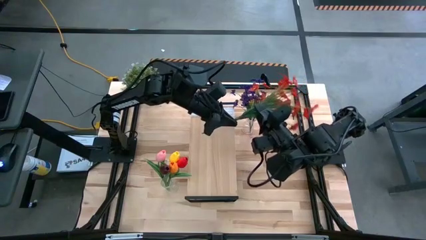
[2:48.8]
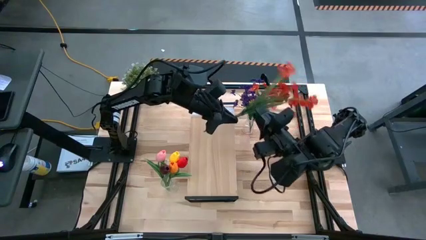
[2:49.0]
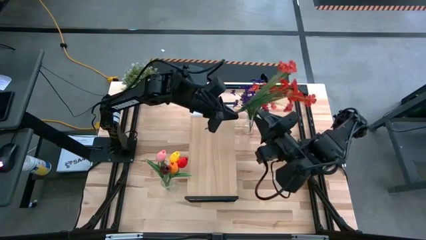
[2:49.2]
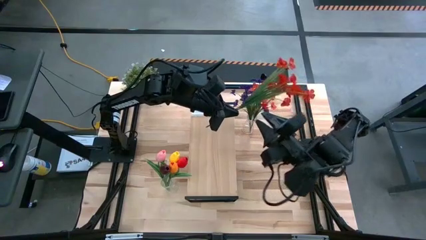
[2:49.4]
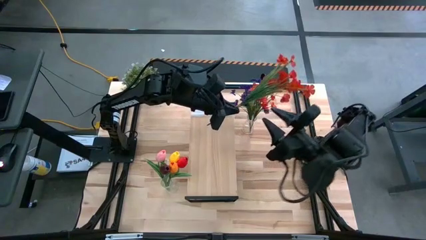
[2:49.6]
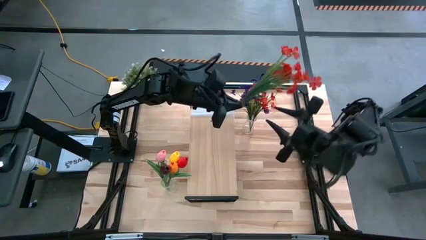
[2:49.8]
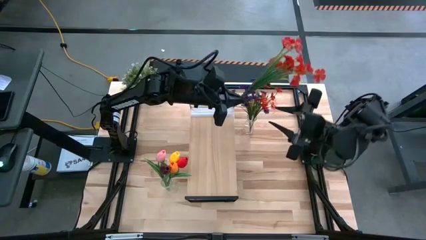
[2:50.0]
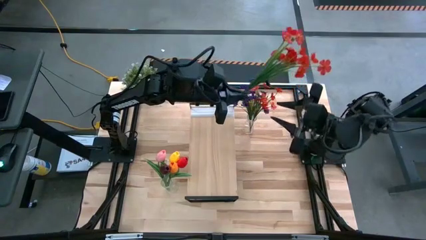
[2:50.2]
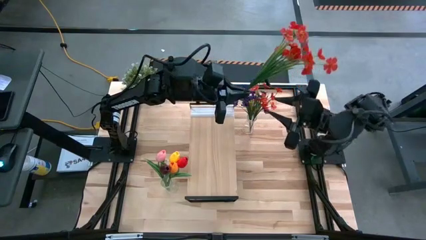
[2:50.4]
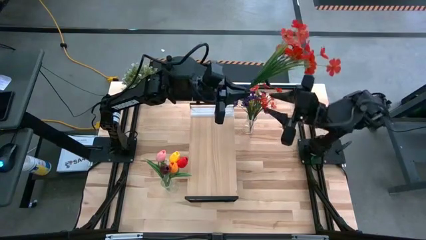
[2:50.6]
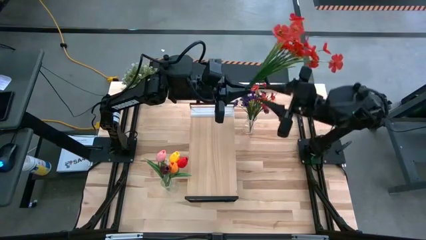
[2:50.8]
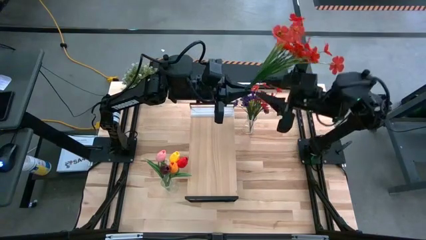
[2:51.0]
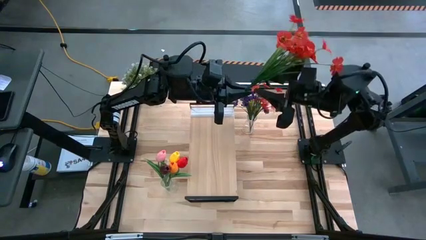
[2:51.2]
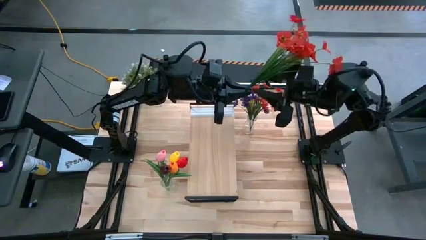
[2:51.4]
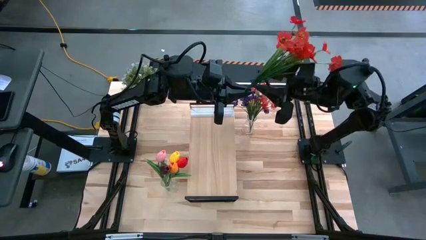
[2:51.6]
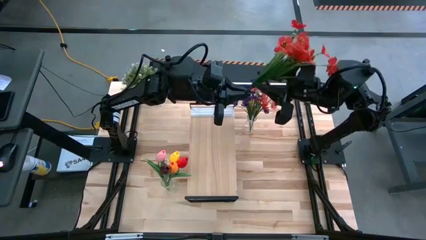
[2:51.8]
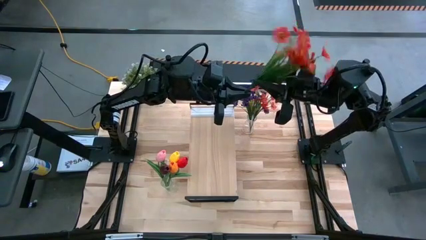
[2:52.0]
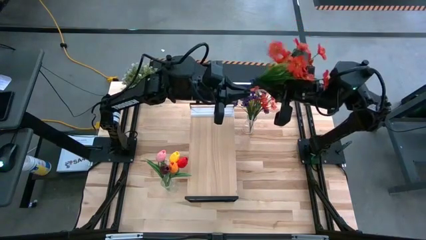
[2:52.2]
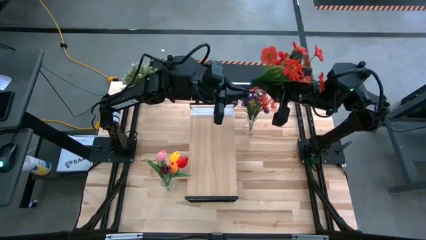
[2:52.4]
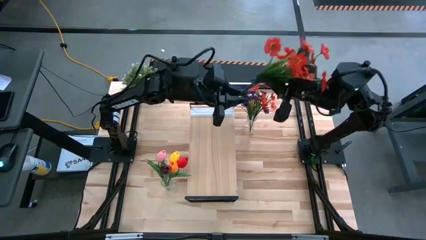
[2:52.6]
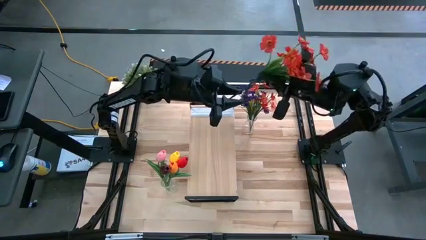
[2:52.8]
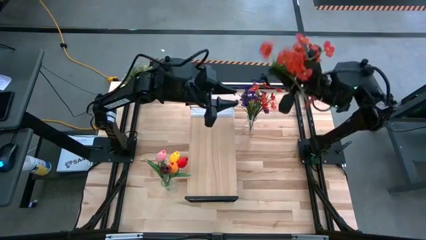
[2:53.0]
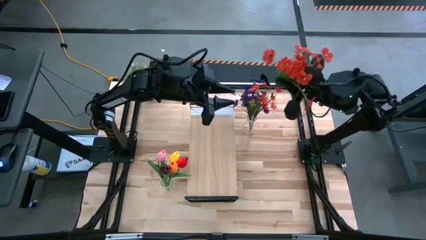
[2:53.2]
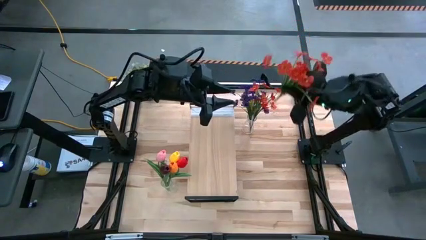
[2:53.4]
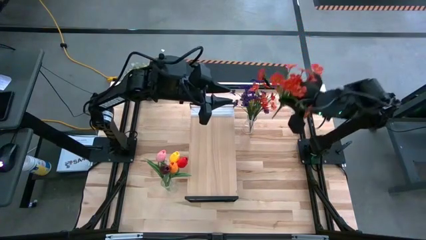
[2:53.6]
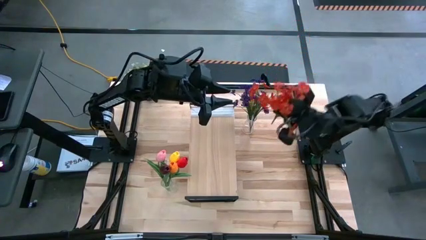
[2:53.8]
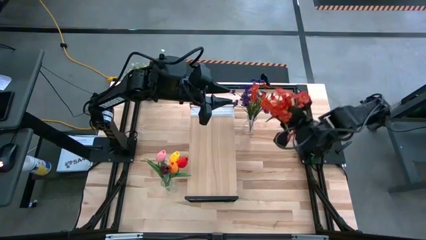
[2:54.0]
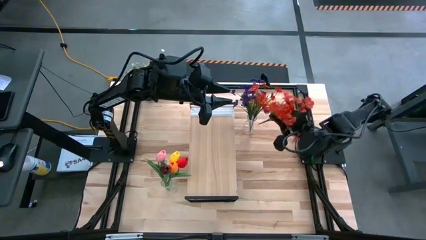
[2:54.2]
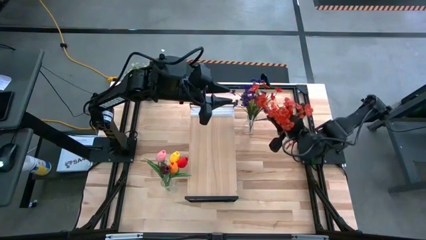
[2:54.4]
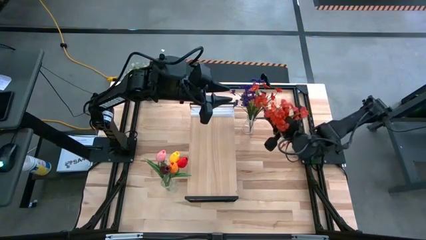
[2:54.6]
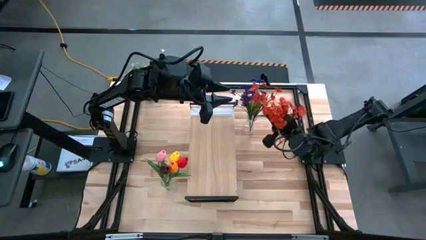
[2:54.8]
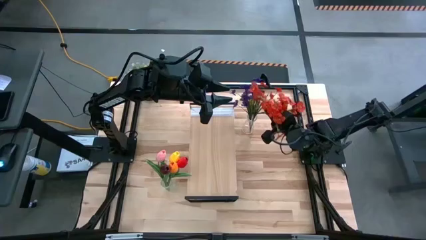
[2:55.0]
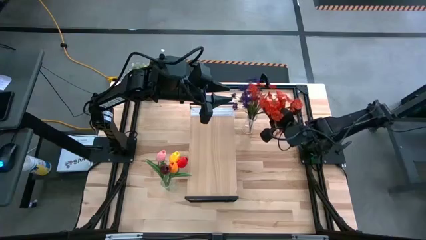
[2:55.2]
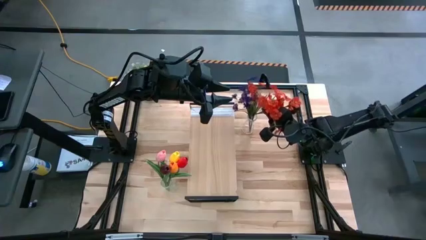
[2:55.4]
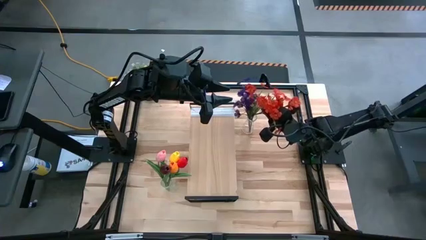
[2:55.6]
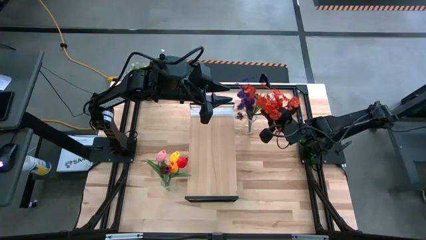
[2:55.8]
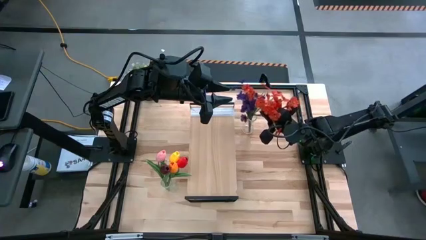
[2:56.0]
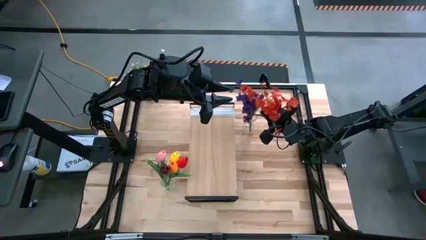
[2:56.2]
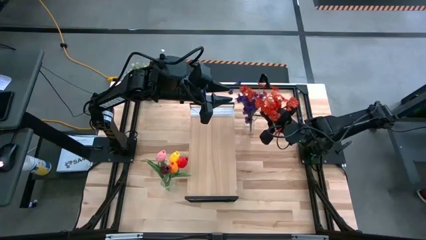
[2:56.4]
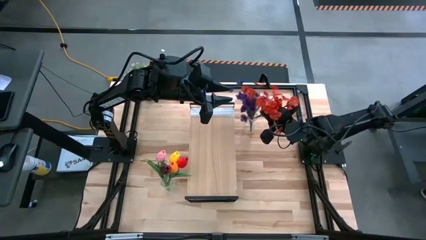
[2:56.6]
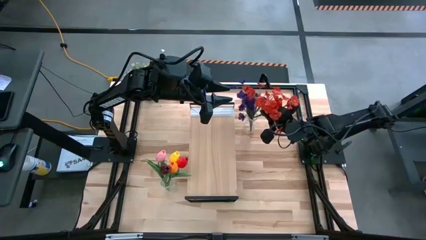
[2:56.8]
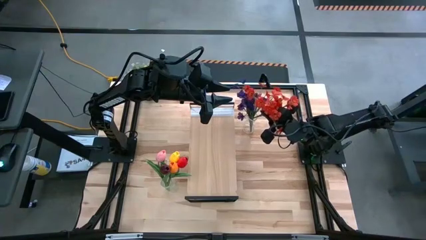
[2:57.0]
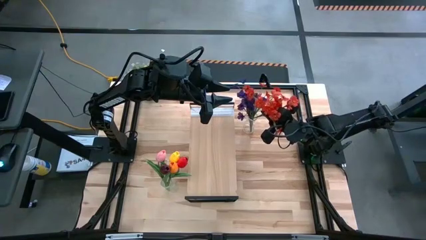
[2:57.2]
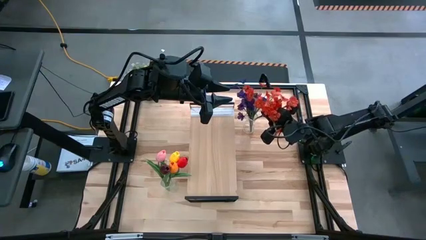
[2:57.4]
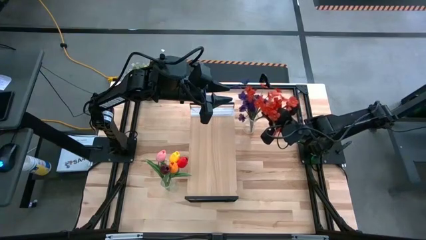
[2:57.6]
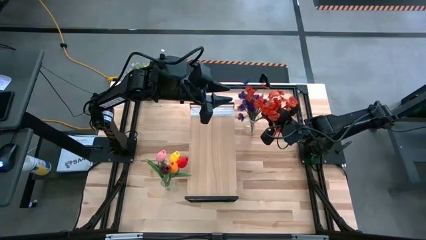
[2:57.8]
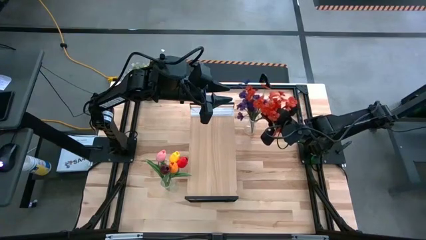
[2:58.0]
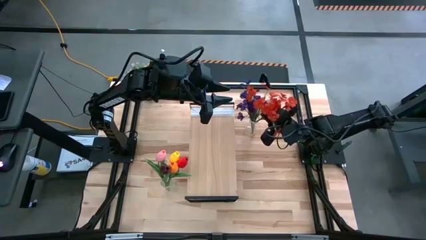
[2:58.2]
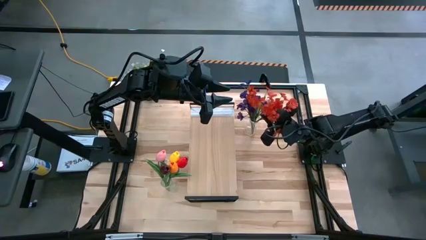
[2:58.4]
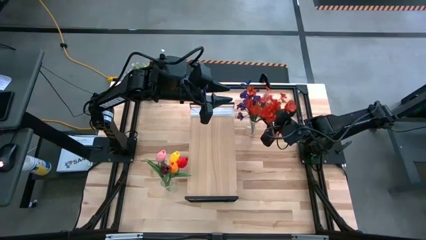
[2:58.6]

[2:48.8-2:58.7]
Task: Pick and place flowers into a vace then onto a shelf
Put the red flowers into the top vase

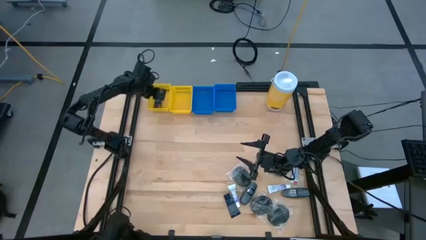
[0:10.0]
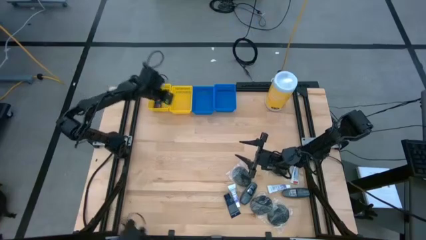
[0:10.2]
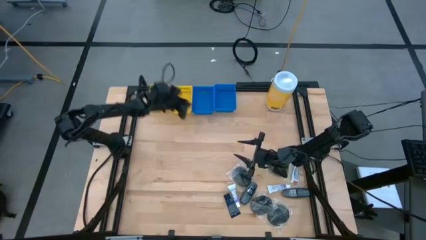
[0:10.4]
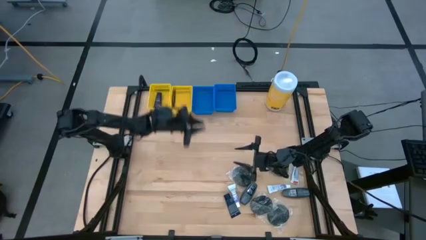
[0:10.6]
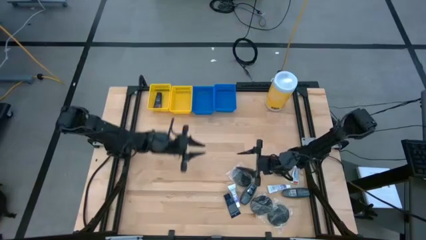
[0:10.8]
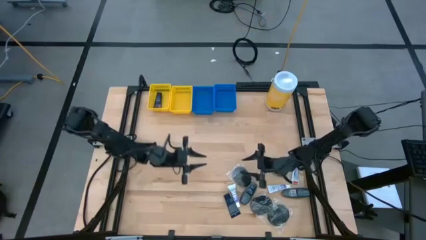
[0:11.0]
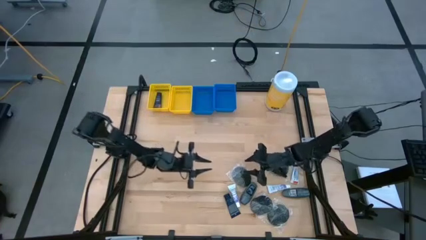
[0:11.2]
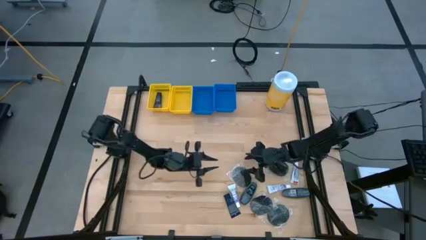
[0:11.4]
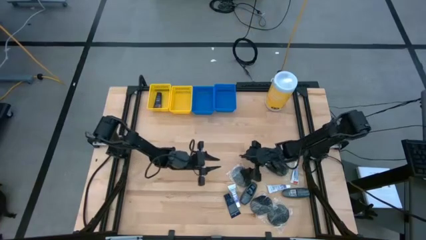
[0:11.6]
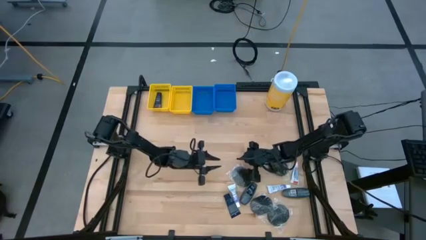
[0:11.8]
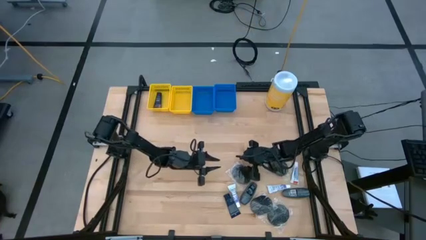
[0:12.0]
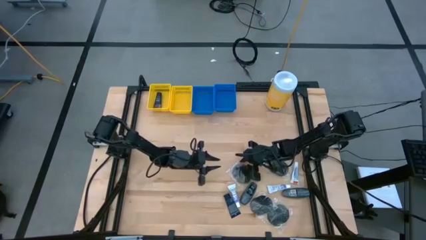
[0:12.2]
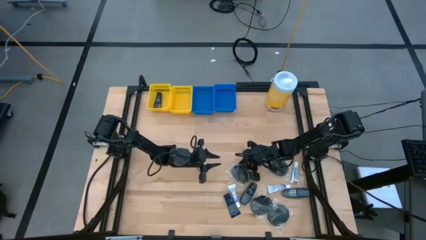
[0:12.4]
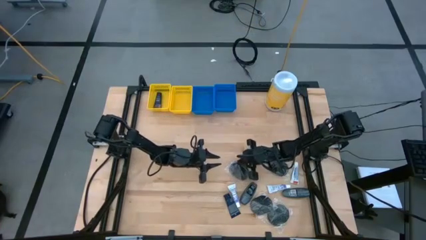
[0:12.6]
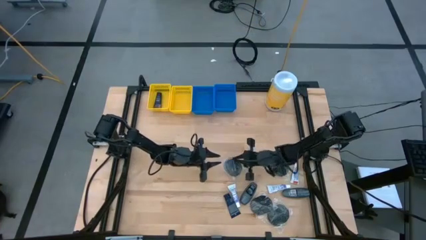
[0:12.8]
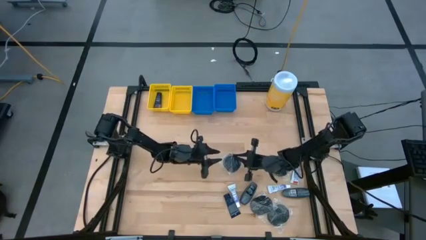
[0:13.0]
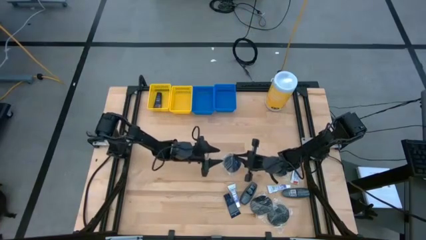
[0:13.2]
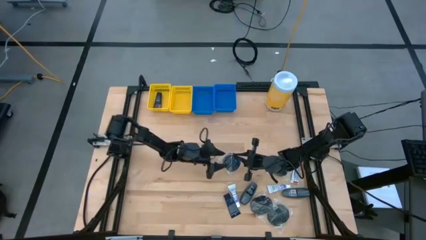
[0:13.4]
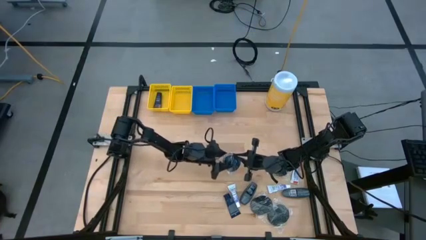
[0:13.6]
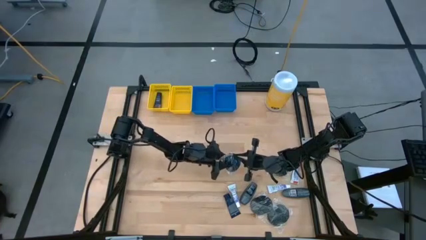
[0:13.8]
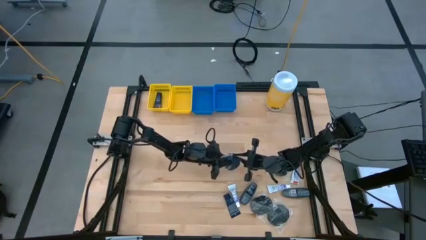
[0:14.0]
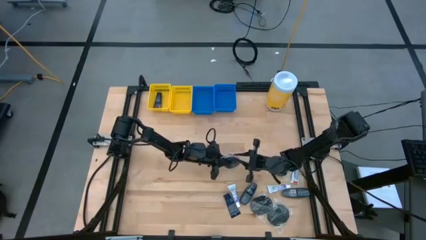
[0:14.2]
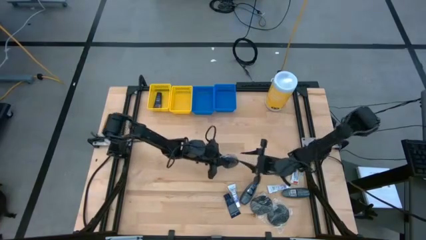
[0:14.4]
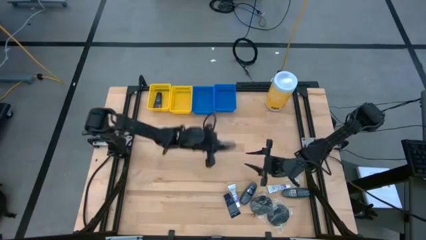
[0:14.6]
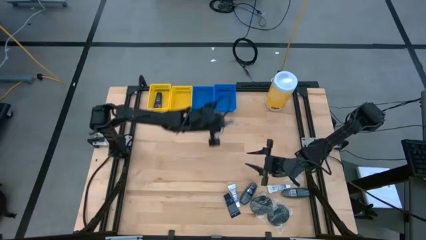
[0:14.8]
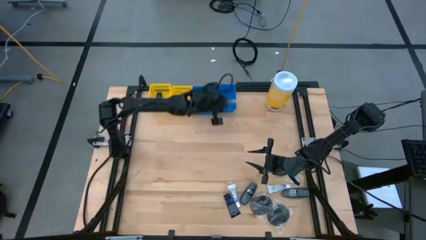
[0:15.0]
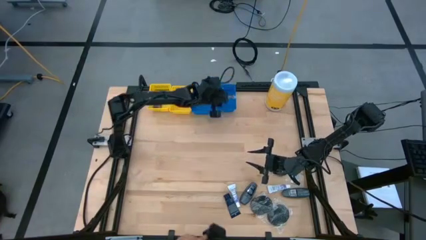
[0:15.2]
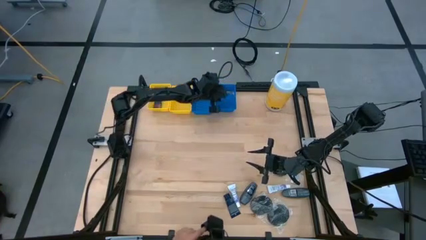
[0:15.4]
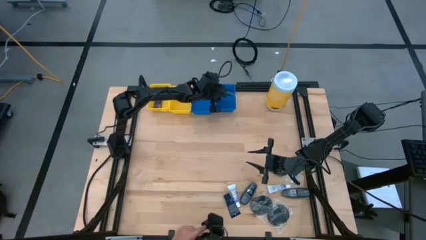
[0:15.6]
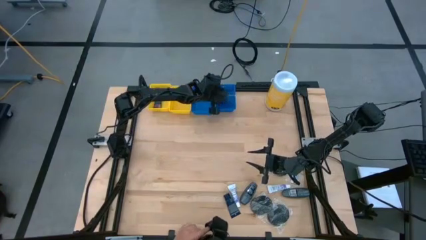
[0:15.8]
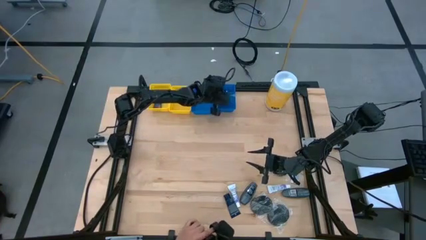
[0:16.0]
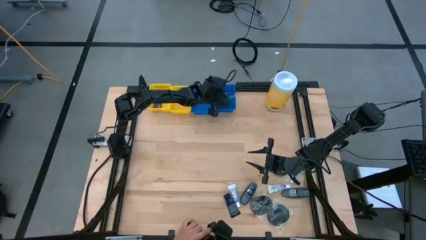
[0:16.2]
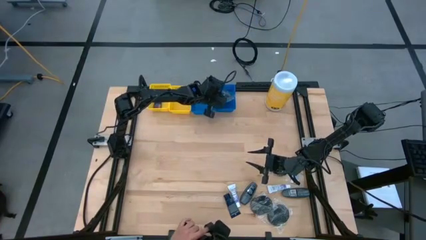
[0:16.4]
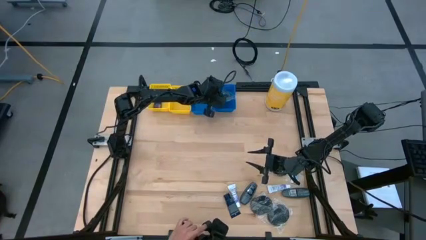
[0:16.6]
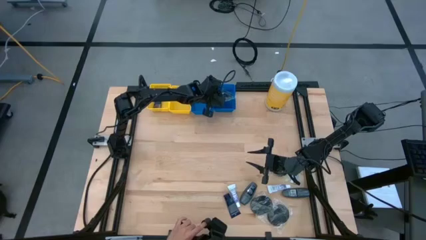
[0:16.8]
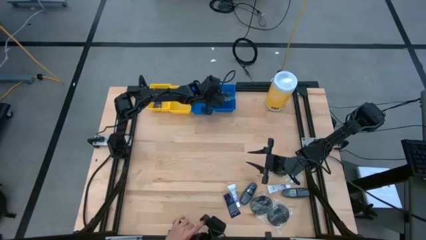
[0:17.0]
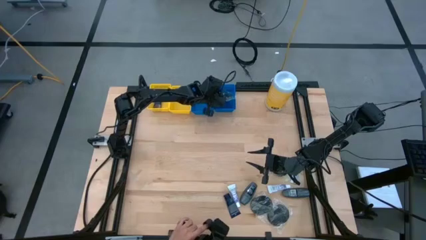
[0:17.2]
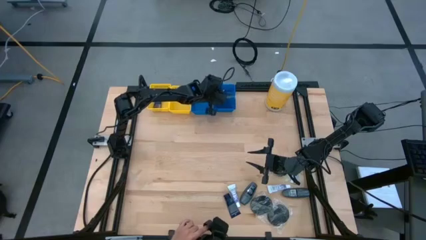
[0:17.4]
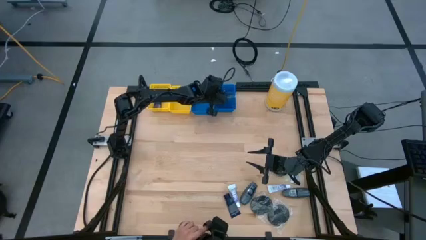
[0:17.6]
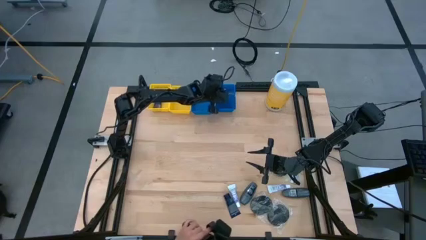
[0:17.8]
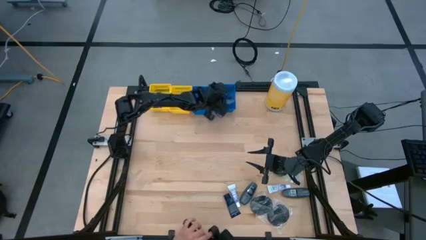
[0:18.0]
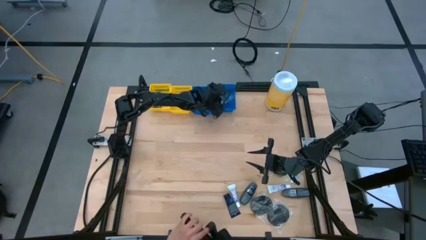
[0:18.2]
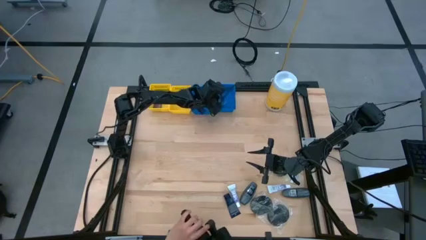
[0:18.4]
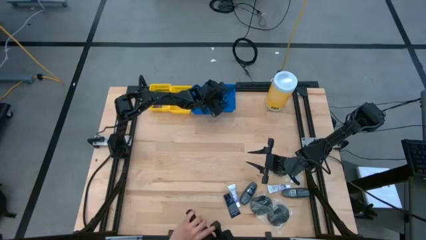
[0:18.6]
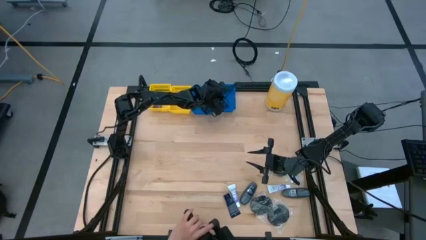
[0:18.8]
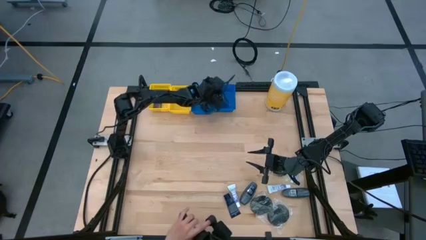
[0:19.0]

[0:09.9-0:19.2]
Task: Pick & Place Travel size toiletries
Put the black hairbrush into the right blue bin
